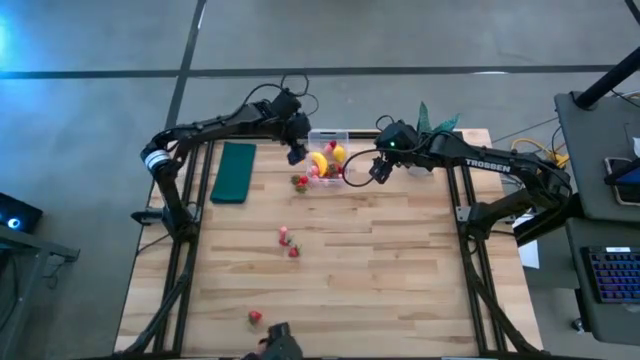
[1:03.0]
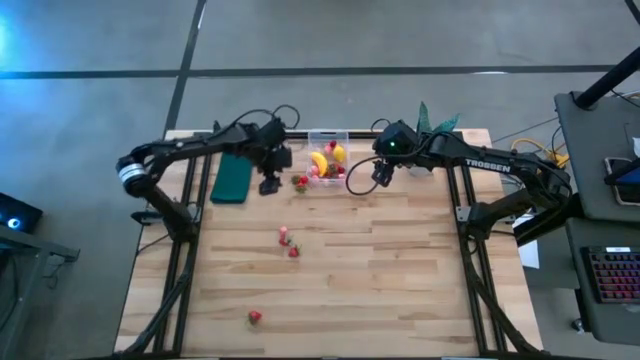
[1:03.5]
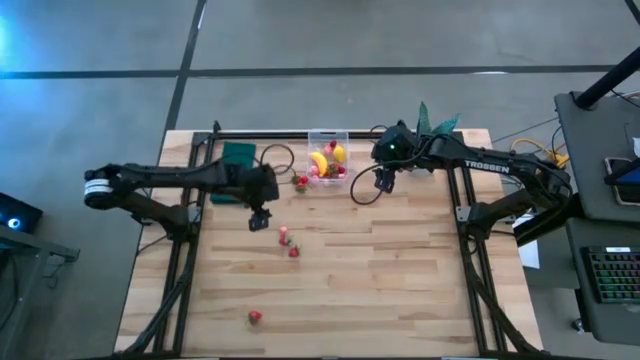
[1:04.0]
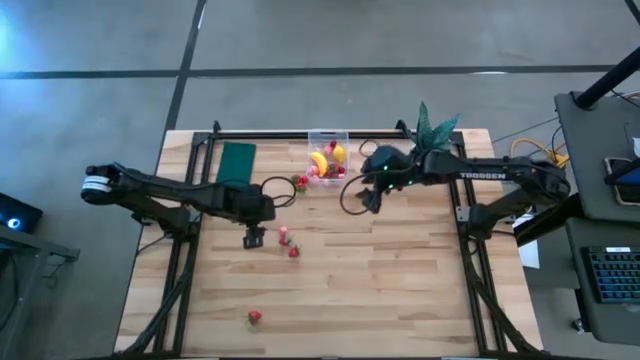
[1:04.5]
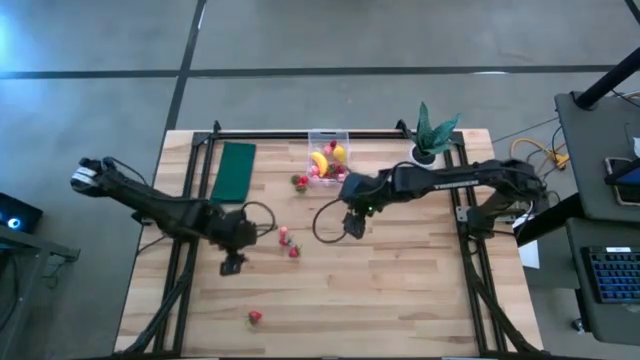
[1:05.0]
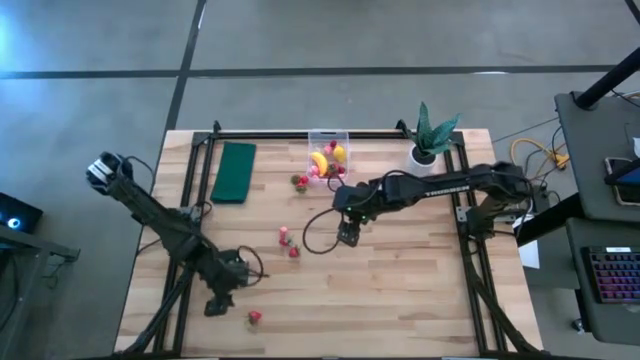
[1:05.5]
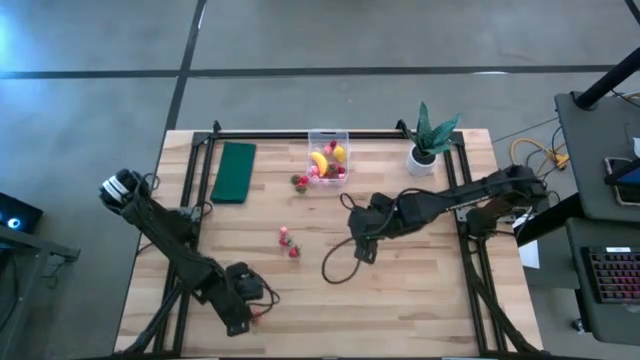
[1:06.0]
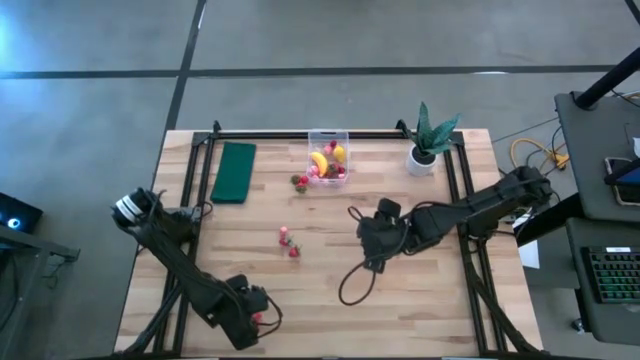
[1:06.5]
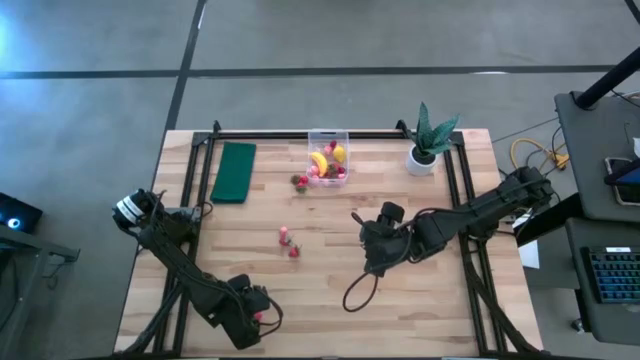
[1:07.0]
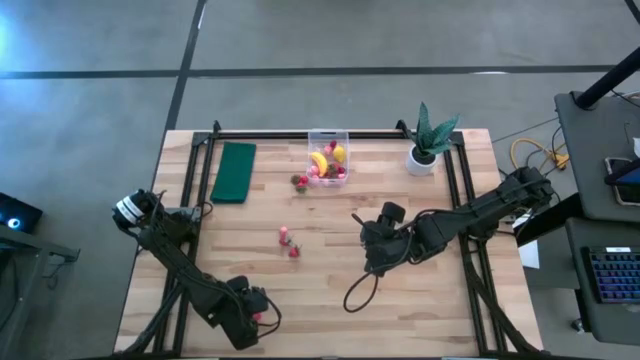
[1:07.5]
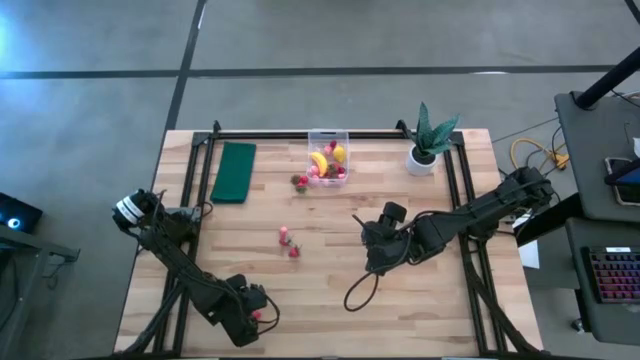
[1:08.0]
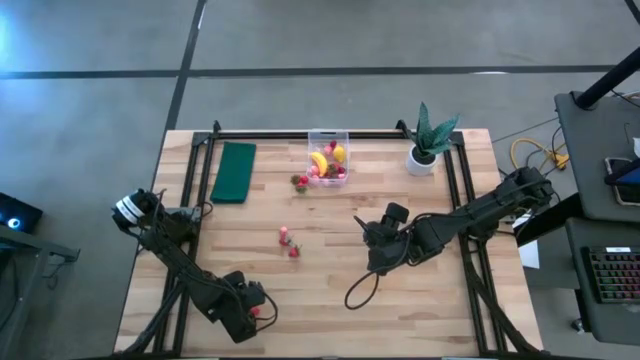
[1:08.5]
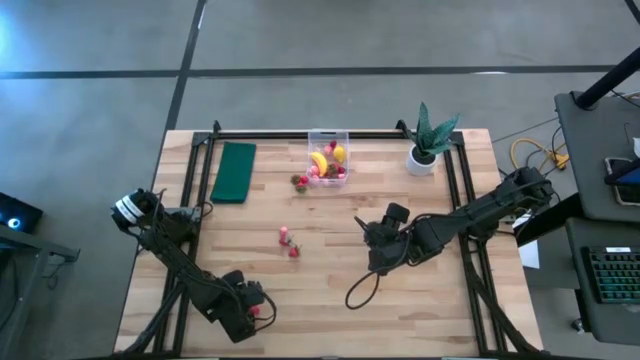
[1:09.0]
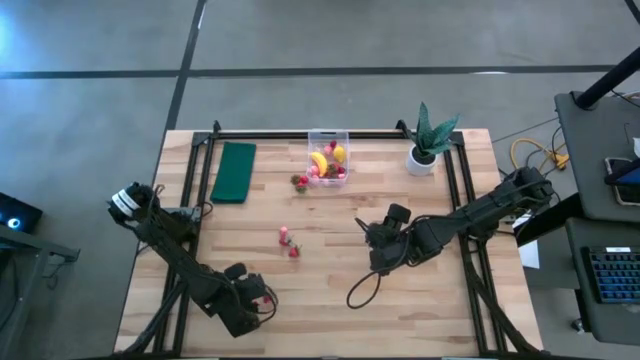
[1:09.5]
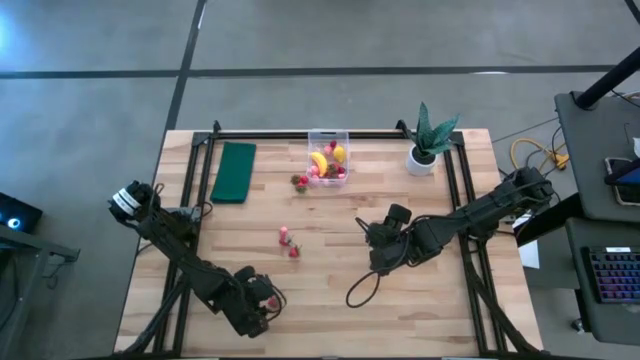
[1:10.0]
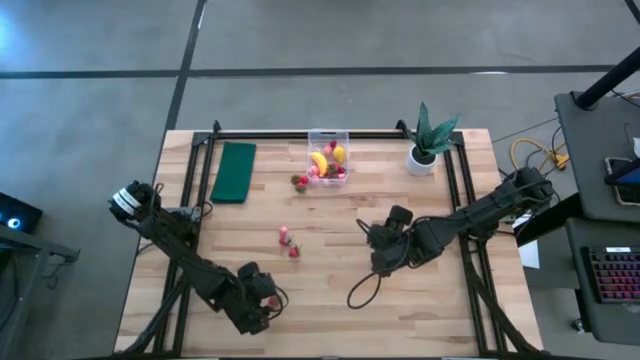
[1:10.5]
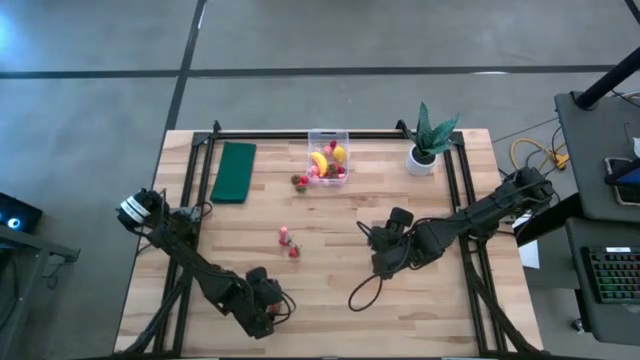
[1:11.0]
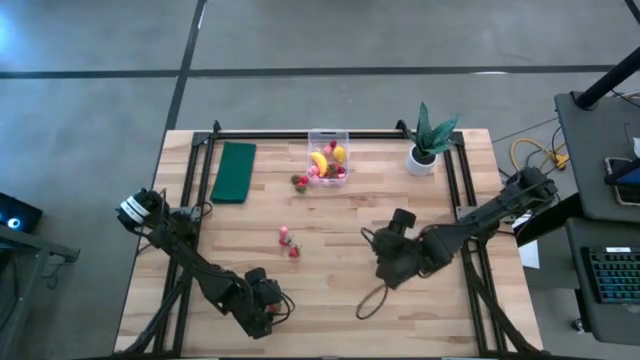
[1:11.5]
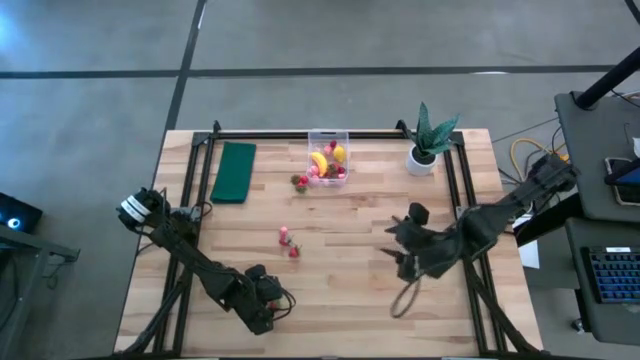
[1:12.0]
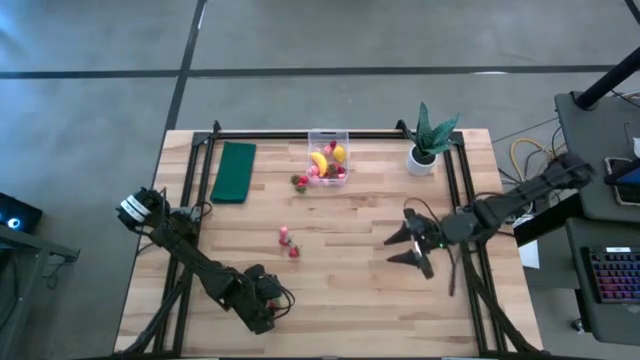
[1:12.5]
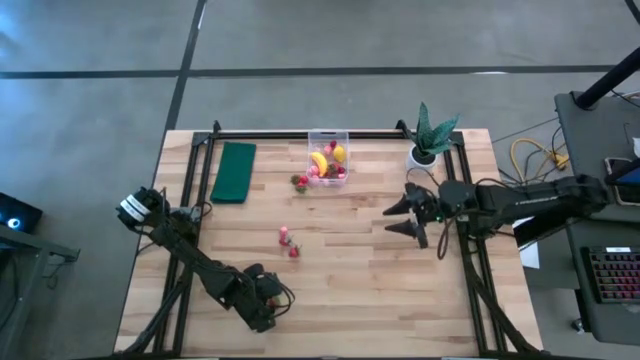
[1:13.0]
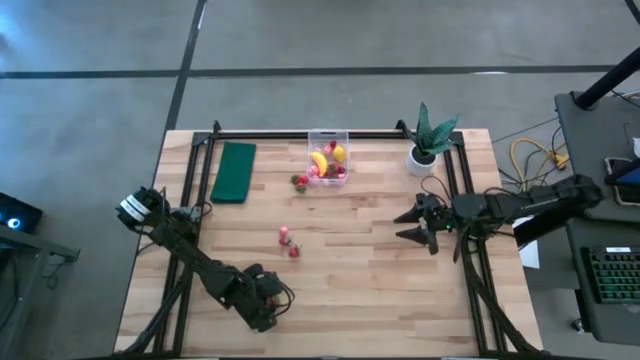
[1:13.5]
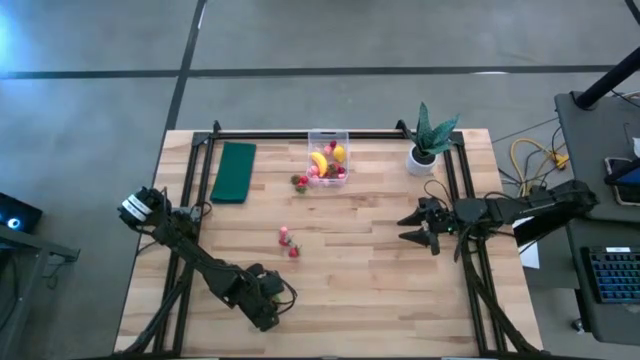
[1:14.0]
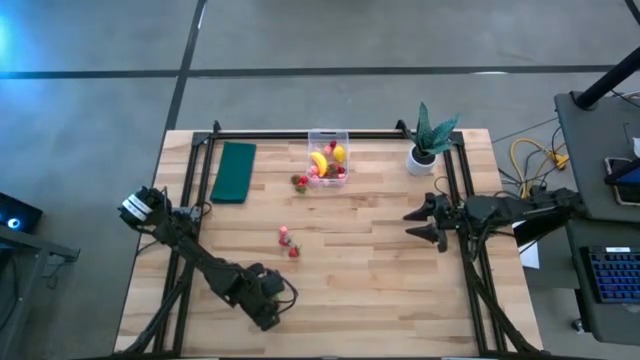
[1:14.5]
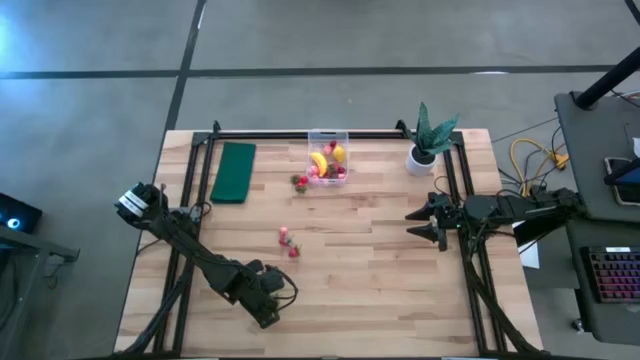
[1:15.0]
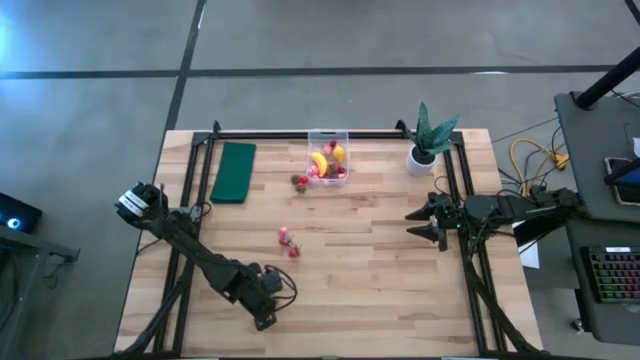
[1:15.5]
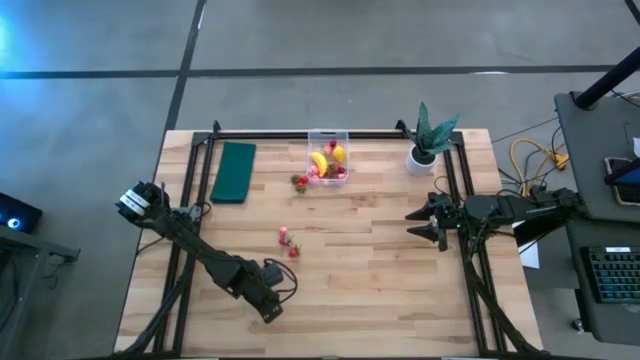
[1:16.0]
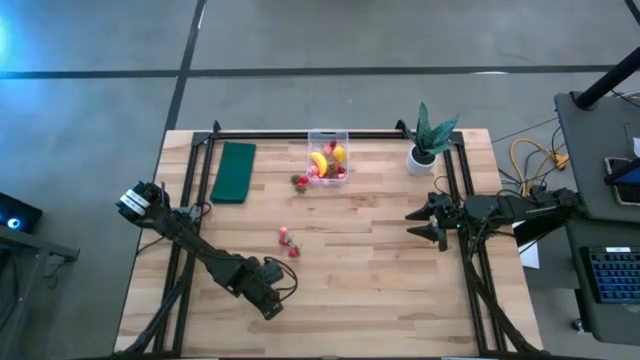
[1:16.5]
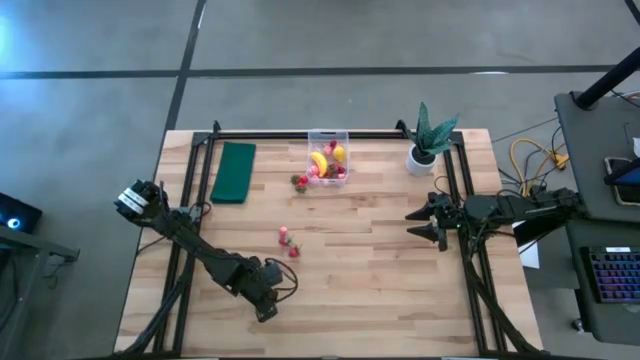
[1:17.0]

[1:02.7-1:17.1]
Task: Pick and placing Produce into tupperware
Put the red strawberry into the transparent bin

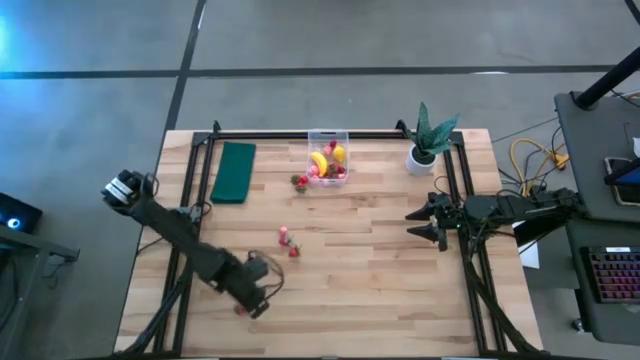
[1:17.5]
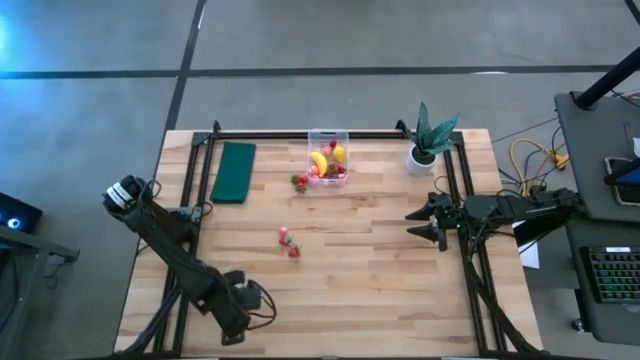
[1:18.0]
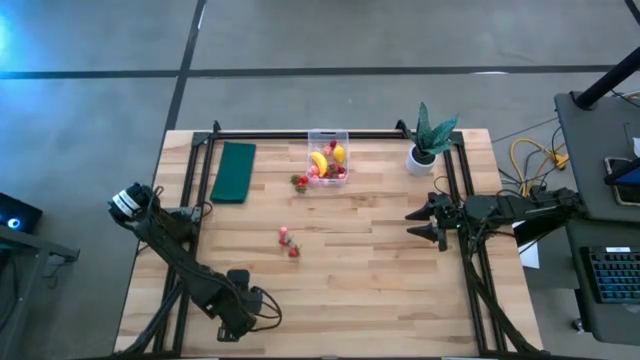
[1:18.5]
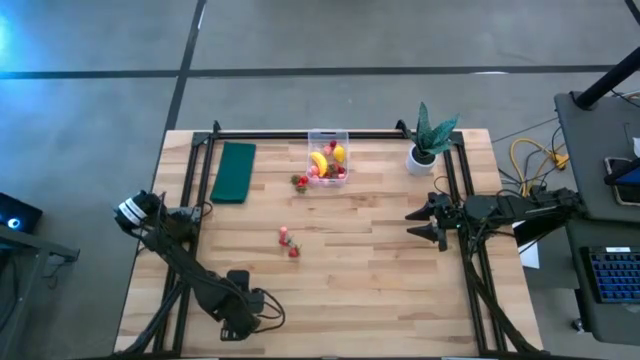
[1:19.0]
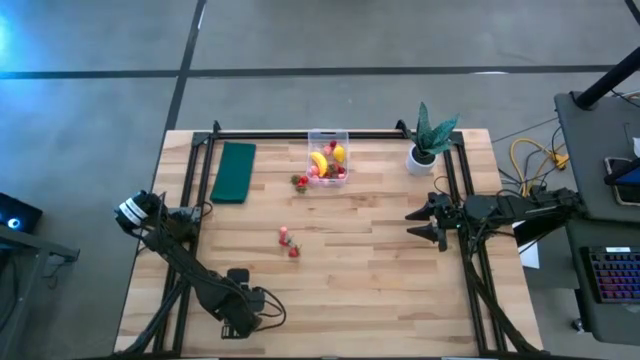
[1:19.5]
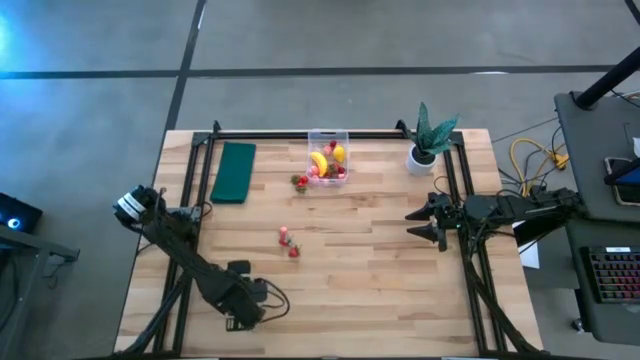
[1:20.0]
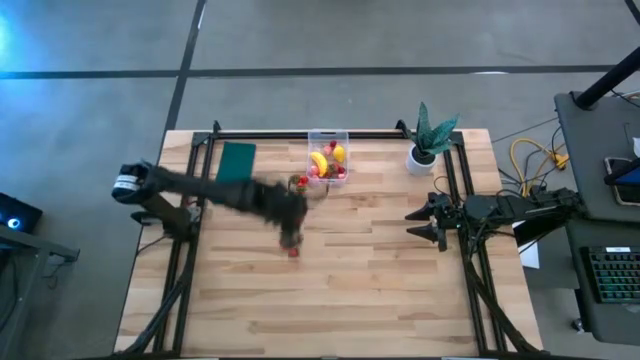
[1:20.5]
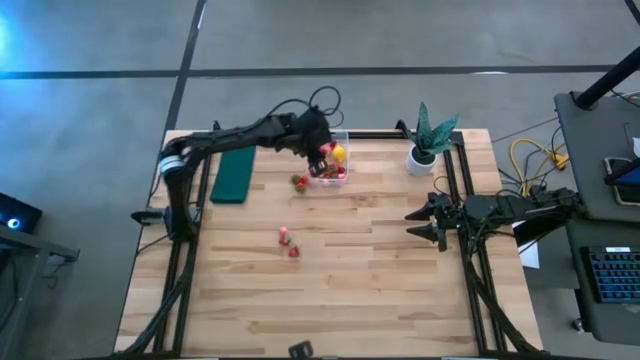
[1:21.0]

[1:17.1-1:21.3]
Put the red strawberry into the transparent bin

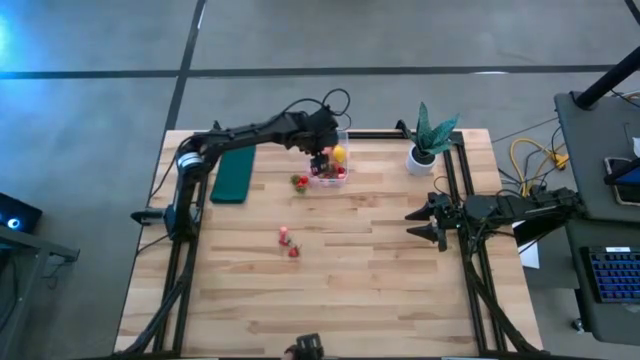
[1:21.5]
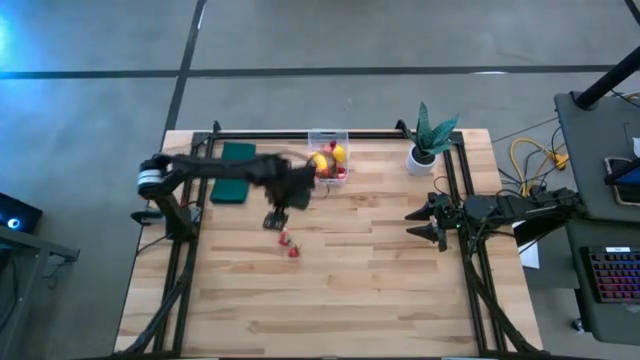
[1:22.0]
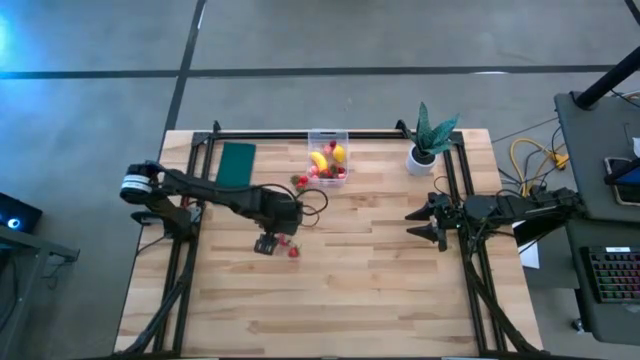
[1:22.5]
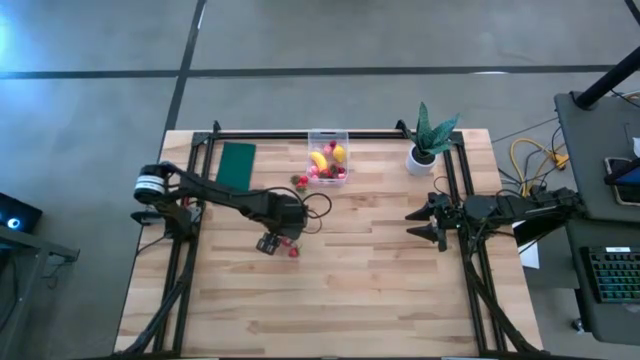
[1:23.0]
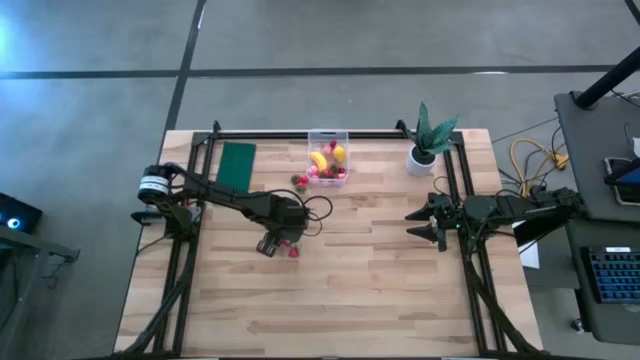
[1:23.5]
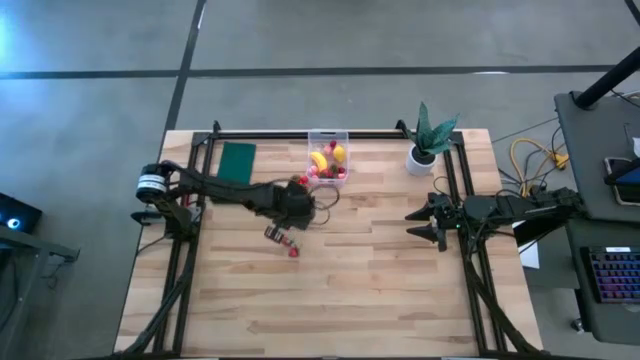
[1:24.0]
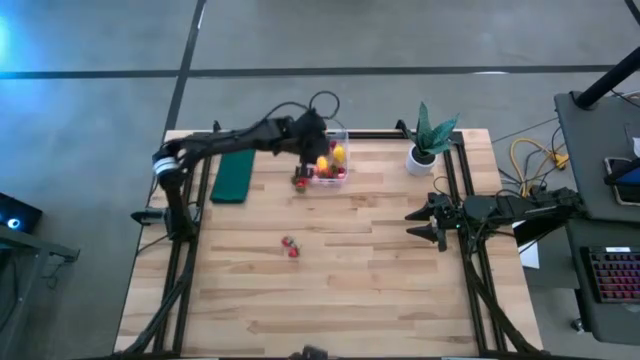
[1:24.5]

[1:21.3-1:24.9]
Put the pink peach into the transparent bin
